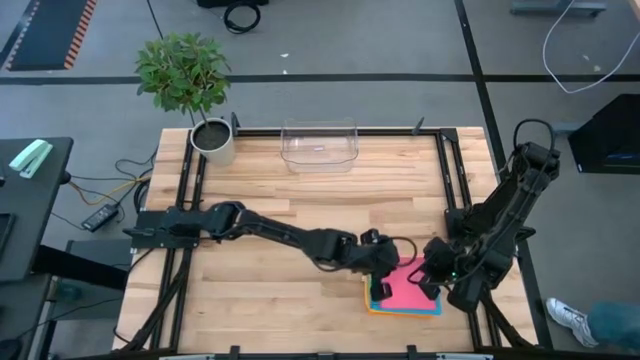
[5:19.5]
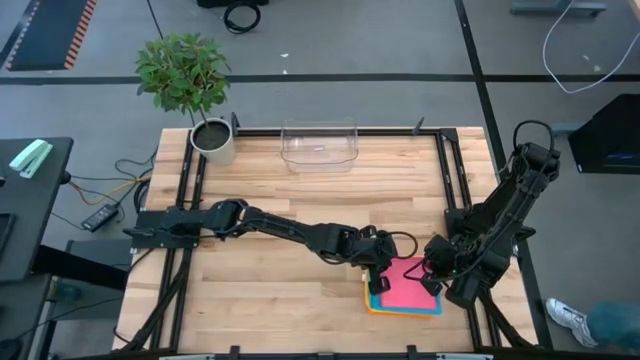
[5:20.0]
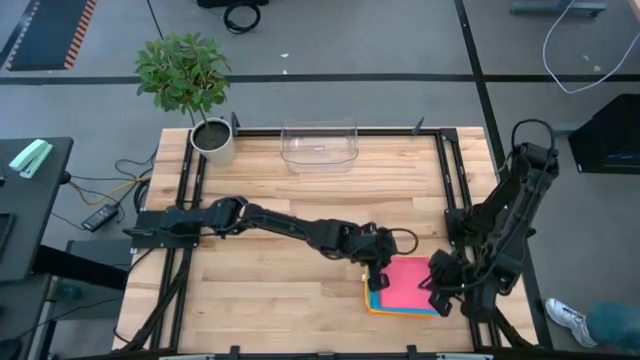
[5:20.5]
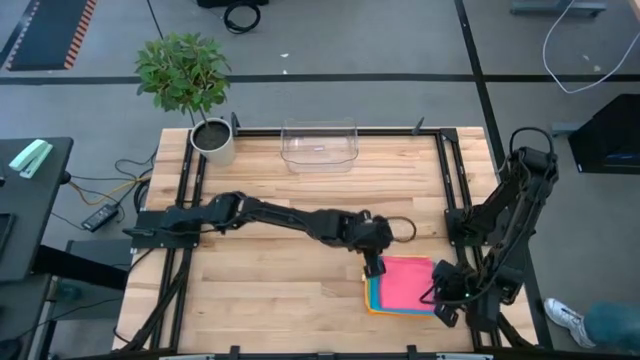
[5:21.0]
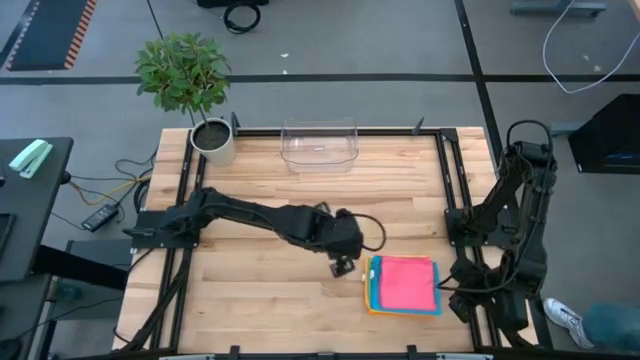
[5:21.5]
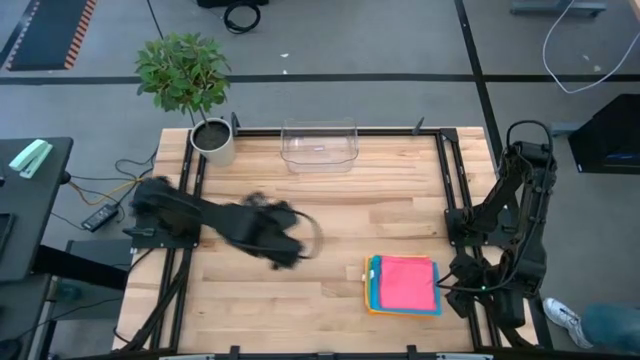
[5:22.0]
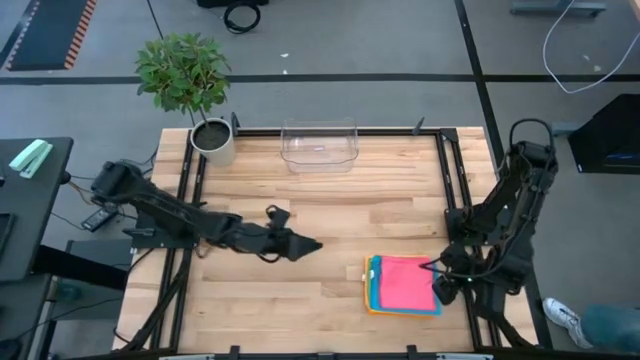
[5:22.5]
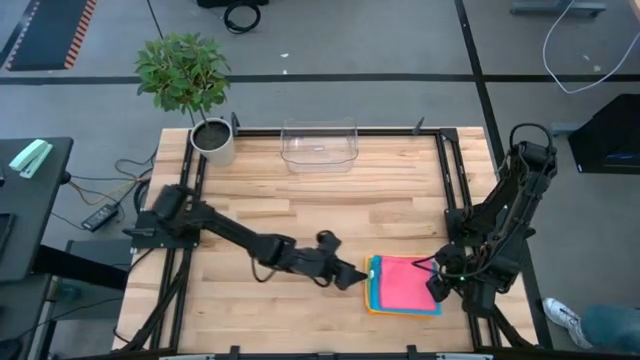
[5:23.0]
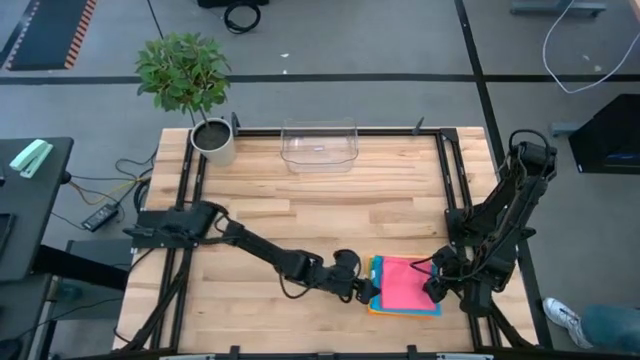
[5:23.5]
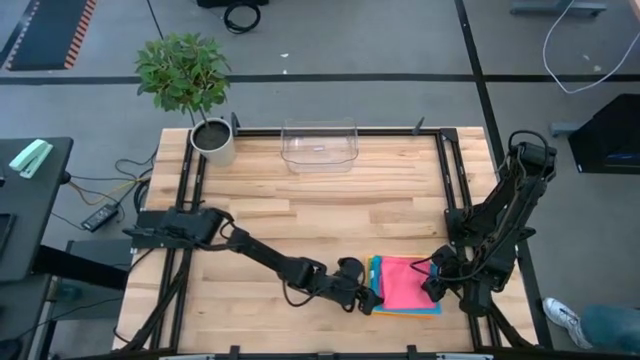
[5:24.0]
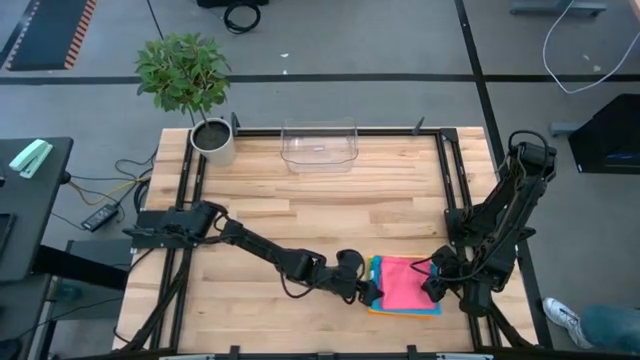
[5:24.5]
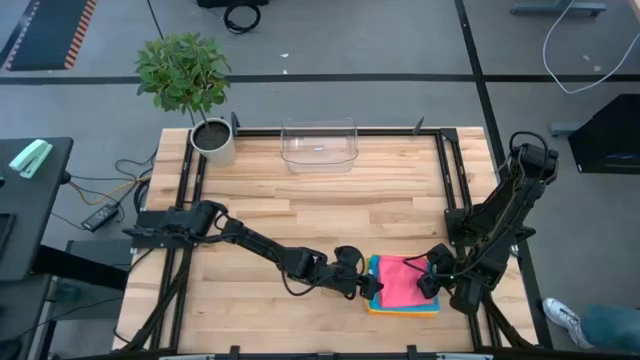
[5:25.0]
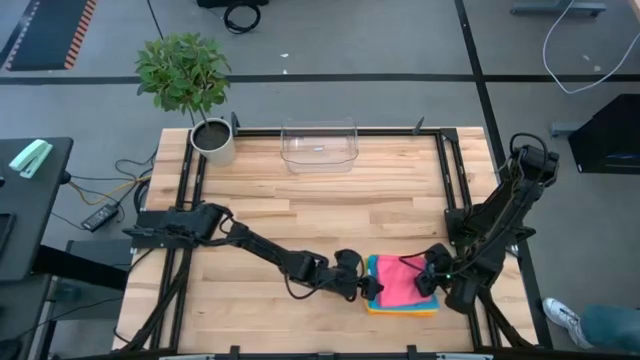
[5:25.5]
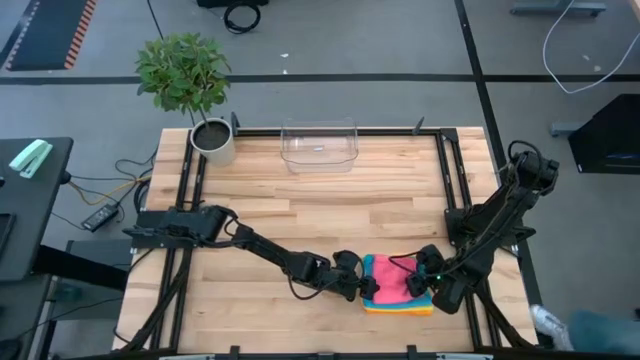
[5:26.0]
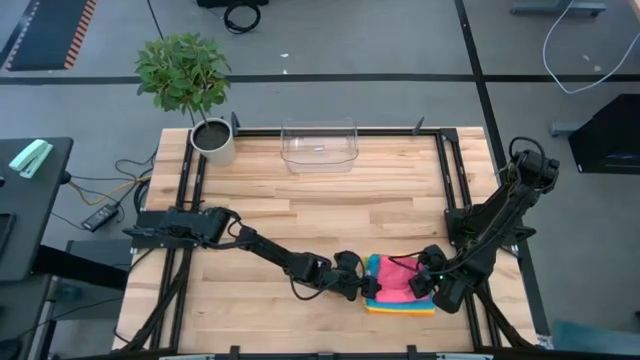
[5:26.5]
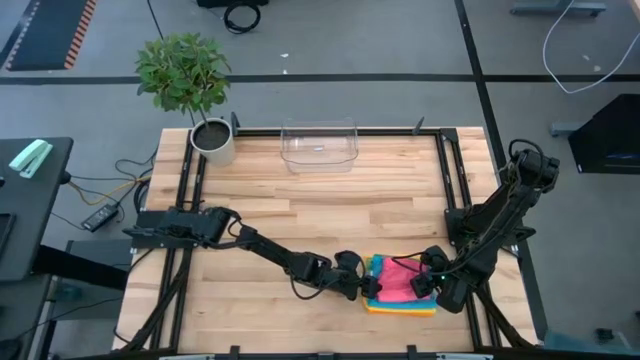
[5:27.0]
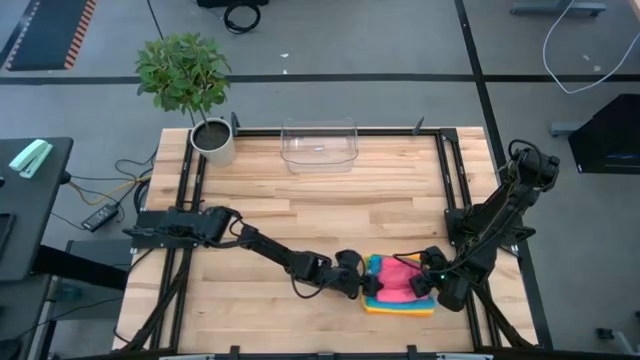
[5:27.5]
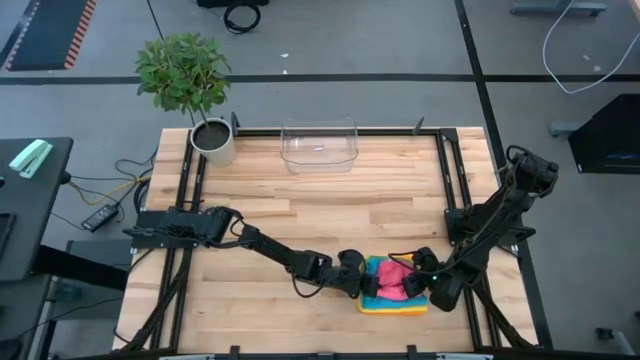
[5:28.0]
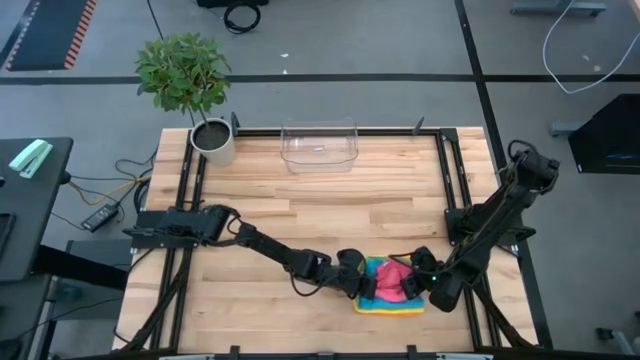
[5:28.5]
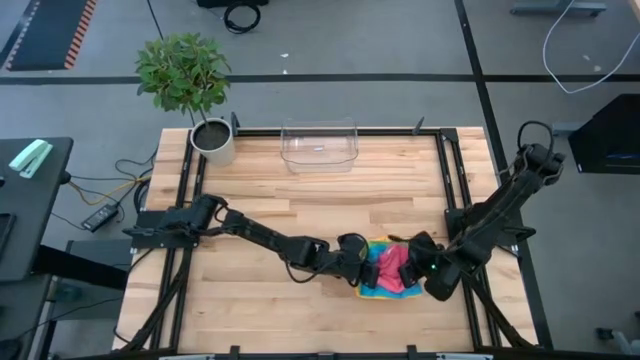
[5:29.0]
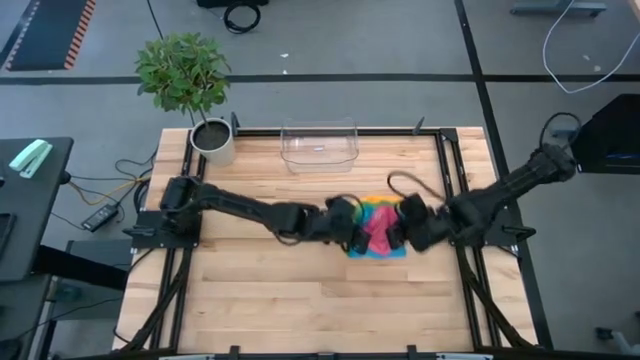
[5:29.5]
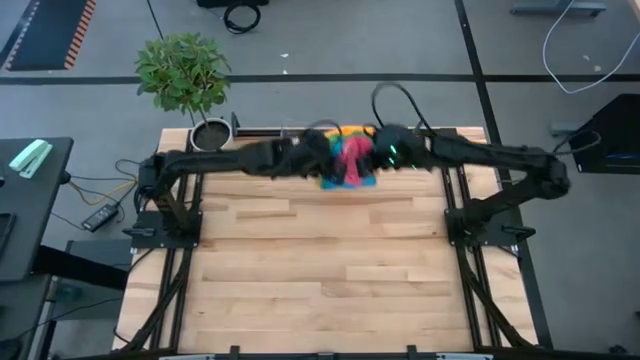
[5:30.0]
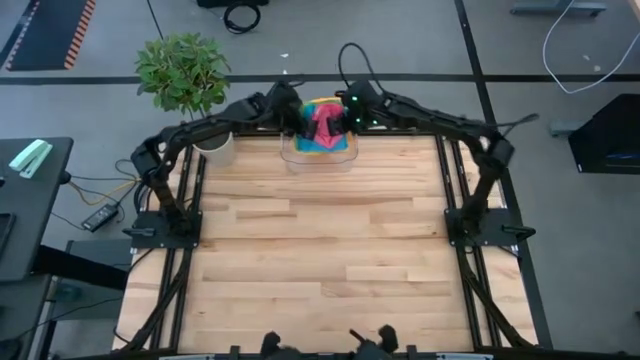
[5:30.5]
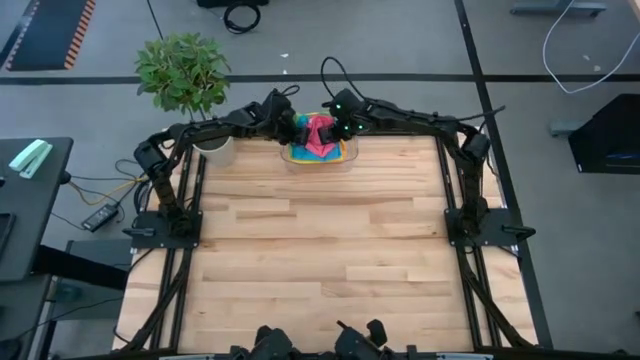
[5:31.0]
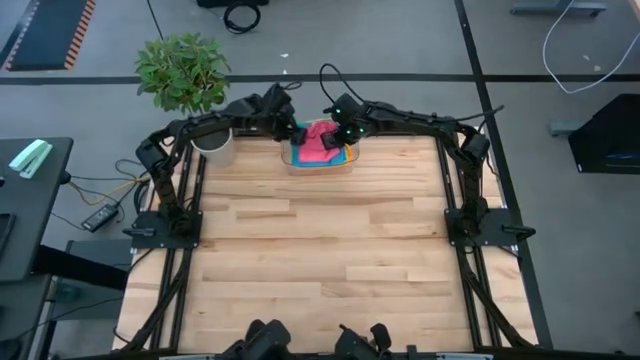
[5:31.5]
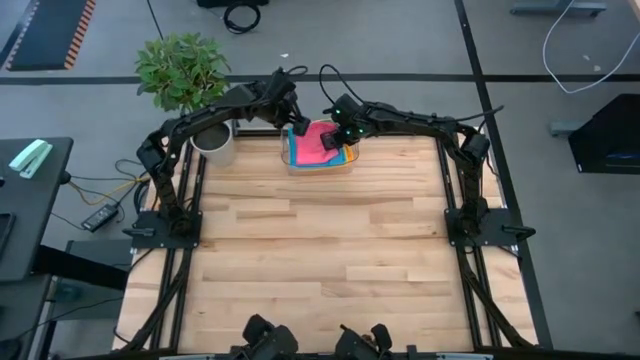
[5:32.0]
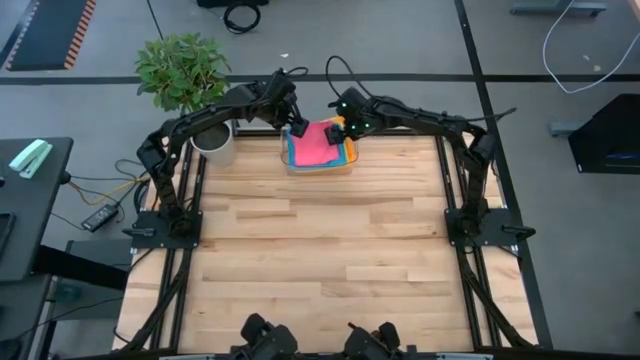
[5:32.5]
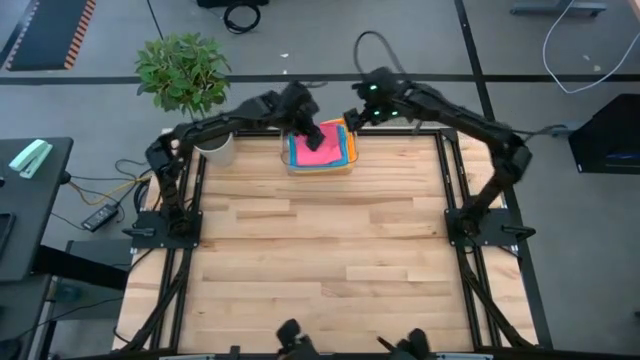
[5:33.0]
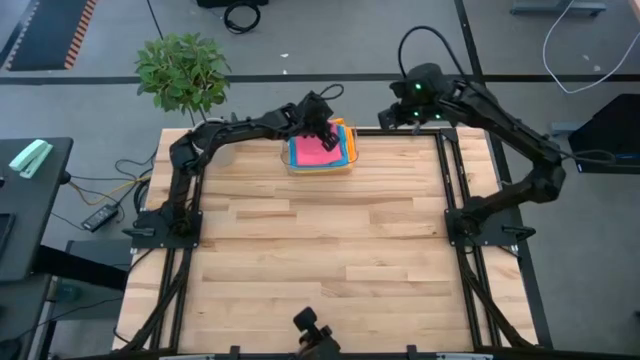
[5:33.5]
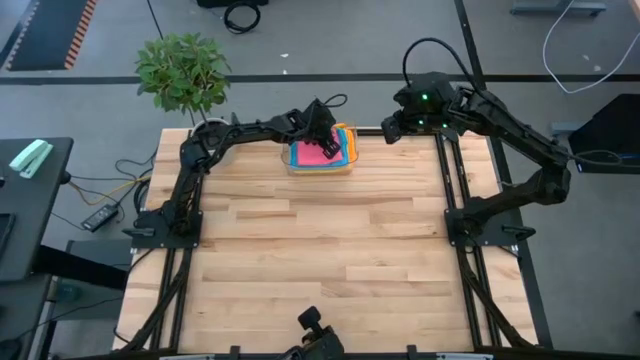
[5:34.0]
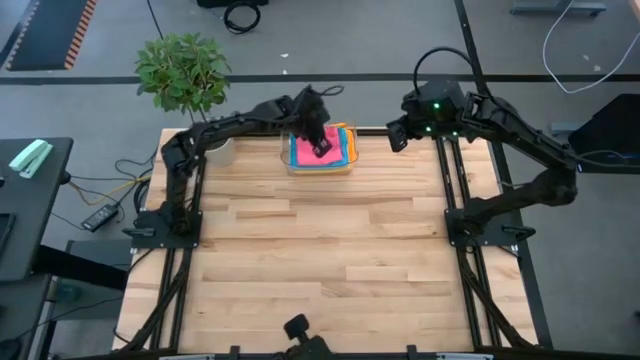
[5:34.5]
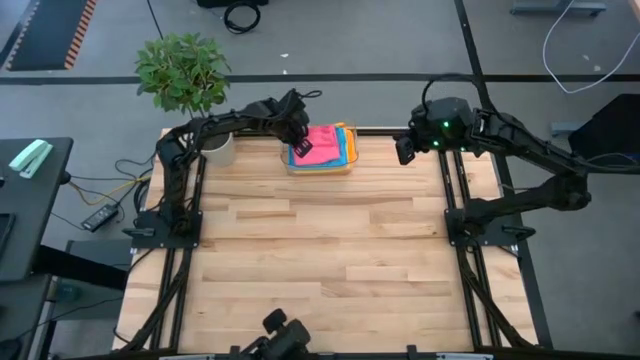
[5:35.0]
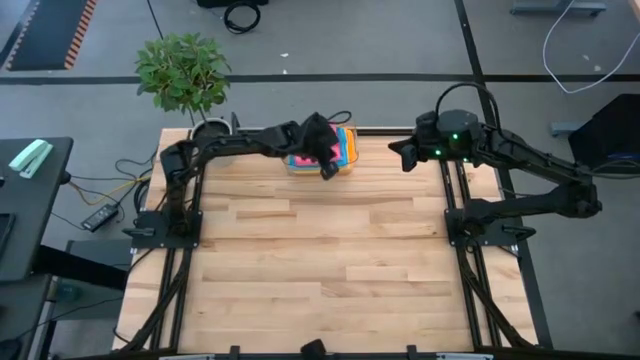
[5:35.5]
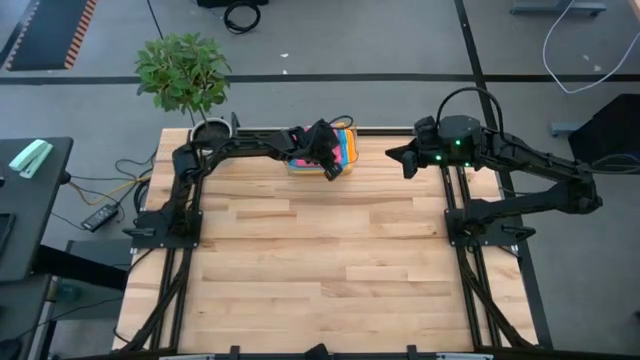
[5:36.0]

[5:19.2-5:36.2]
Task: Fold microfiber towels
Put the folded towels into the transparent bin

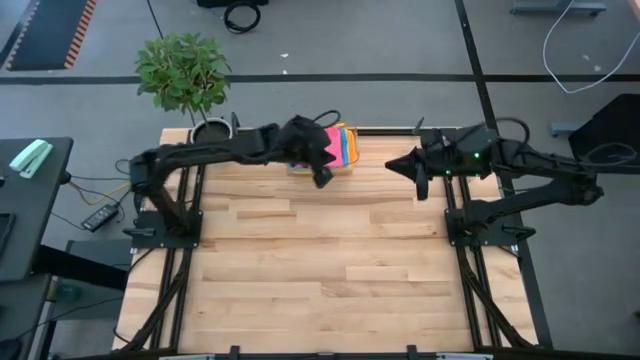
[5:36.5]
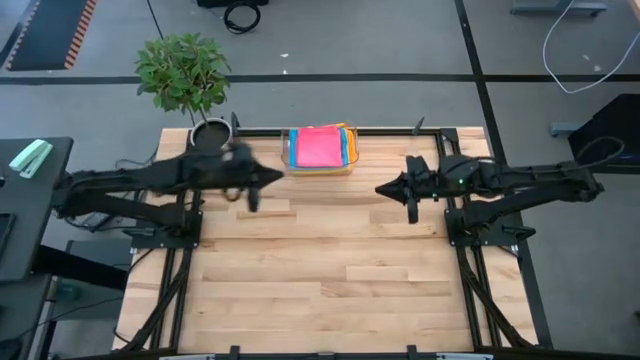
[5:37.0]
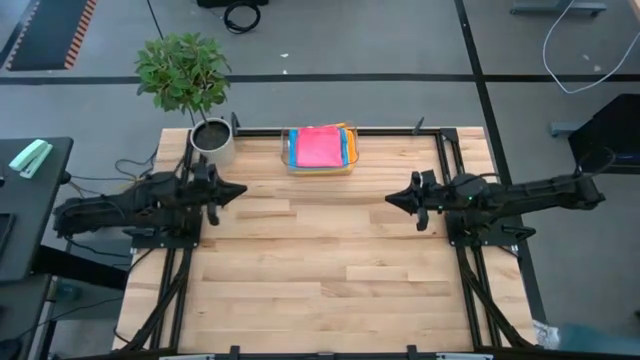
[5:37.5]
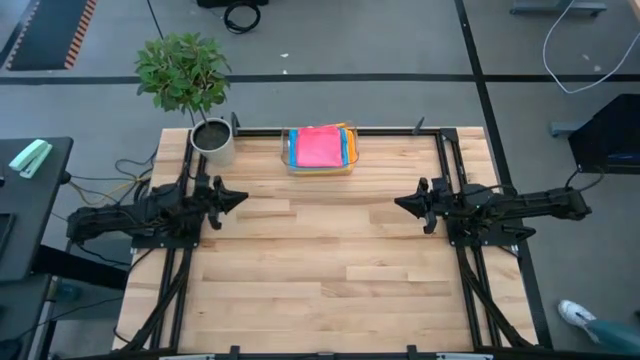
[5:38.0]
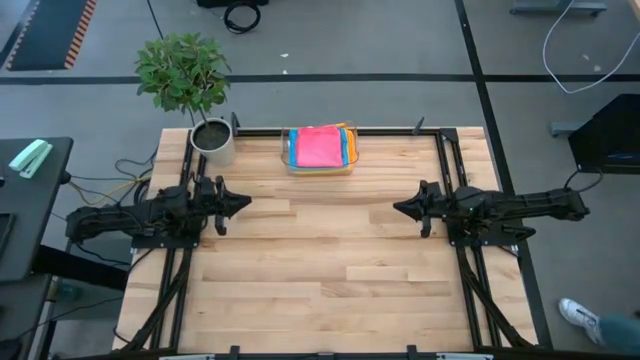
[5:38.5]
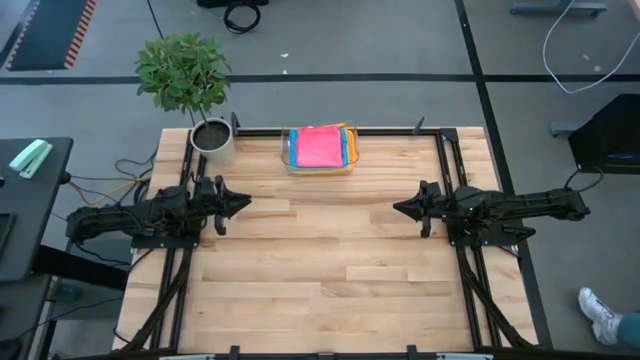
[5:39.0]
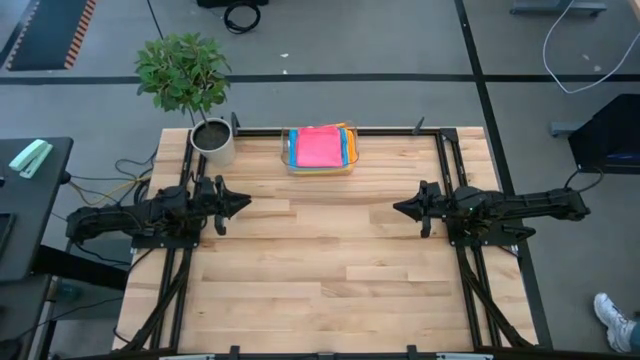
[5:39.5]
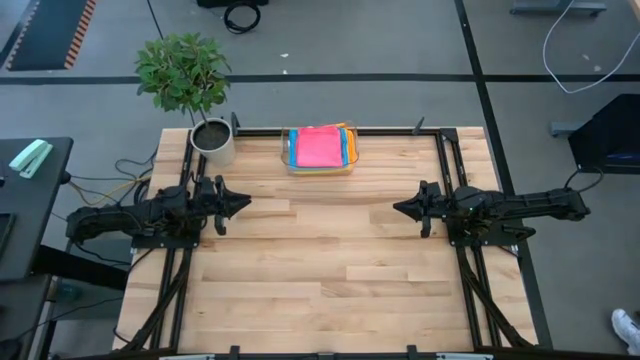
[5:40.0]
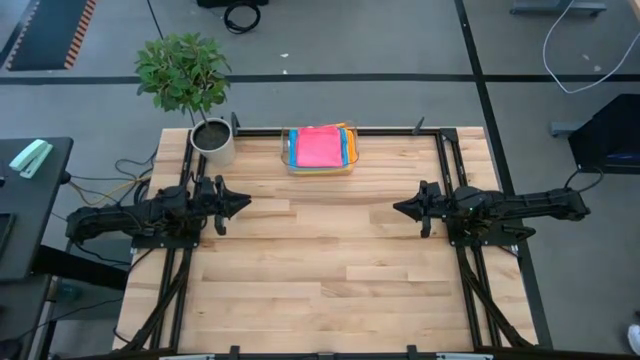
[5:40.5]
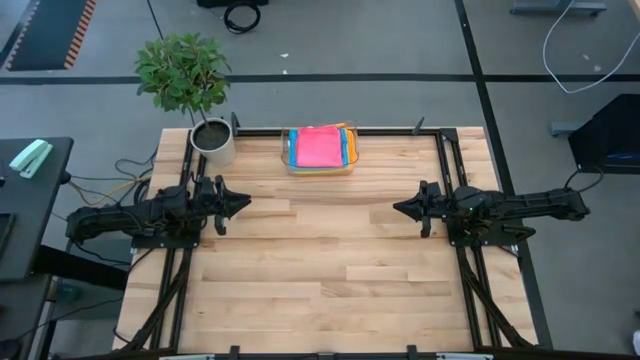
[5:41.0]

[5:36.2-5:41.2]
Return to Home Position
